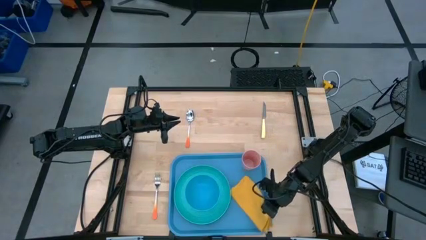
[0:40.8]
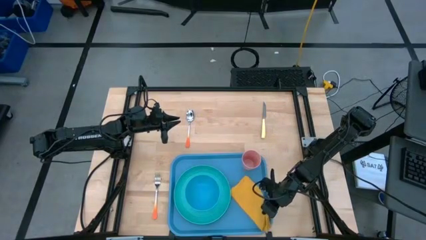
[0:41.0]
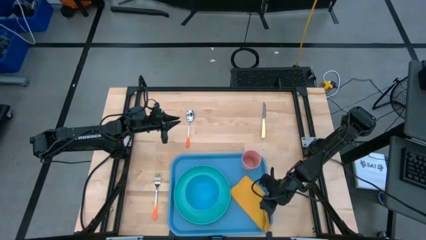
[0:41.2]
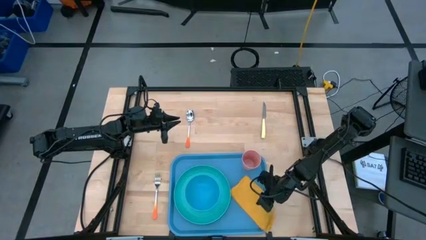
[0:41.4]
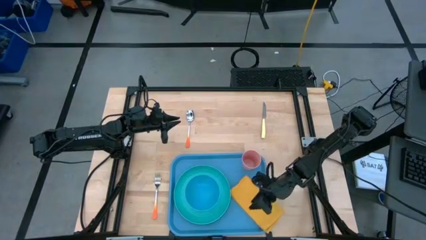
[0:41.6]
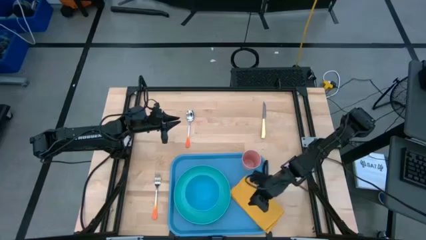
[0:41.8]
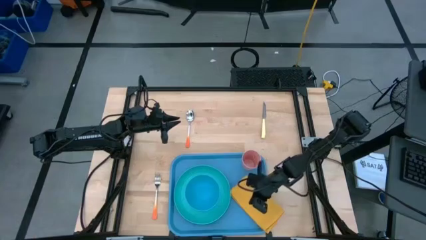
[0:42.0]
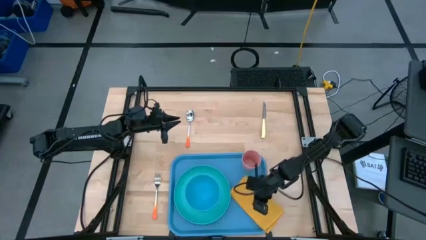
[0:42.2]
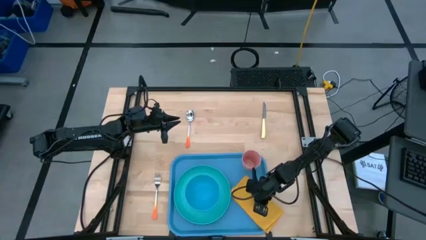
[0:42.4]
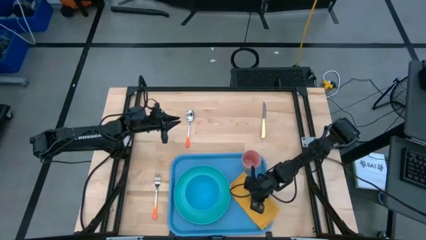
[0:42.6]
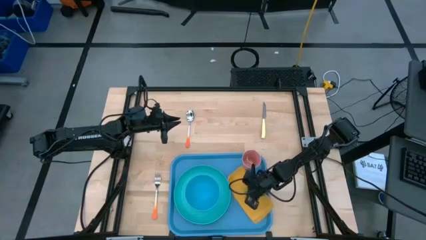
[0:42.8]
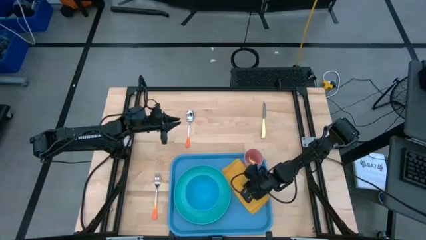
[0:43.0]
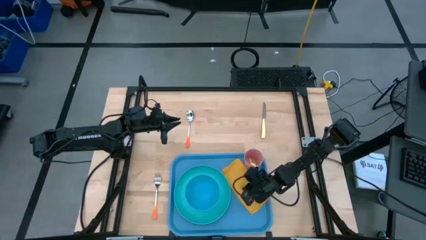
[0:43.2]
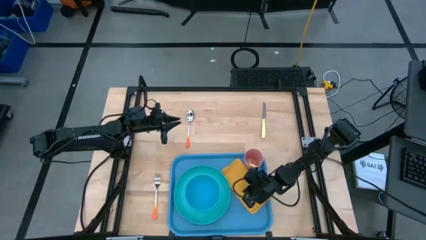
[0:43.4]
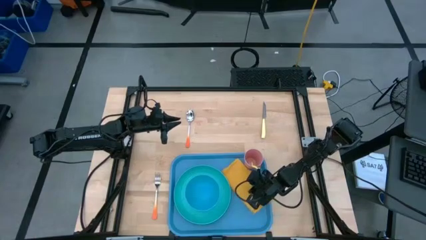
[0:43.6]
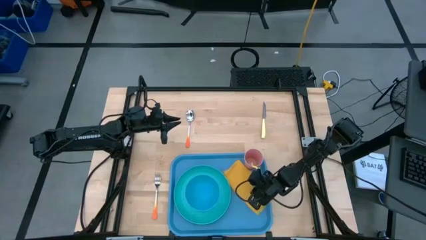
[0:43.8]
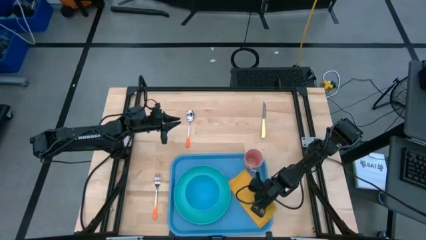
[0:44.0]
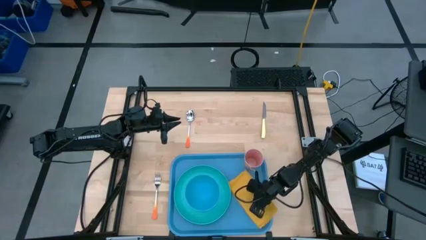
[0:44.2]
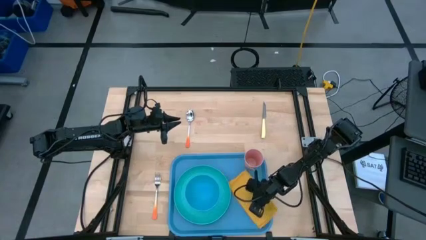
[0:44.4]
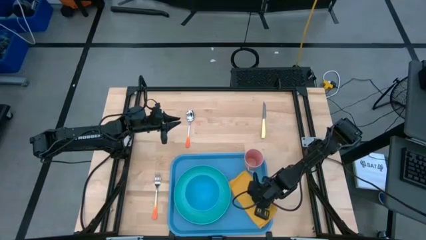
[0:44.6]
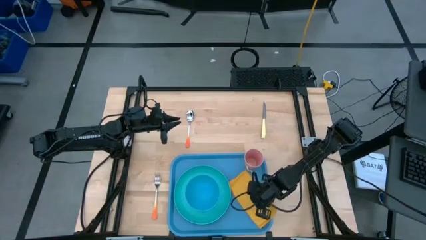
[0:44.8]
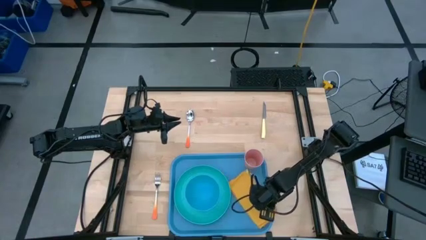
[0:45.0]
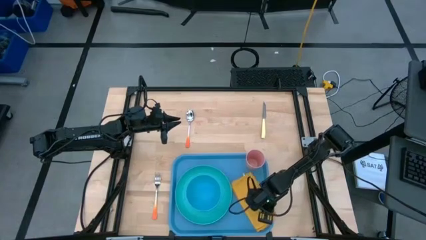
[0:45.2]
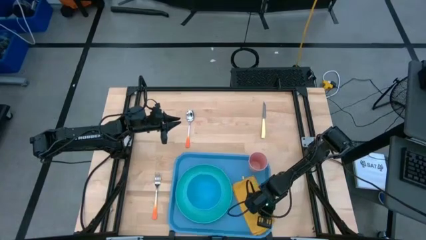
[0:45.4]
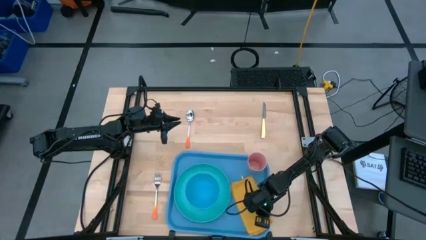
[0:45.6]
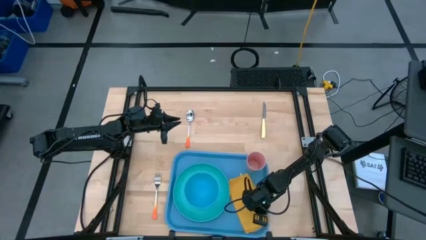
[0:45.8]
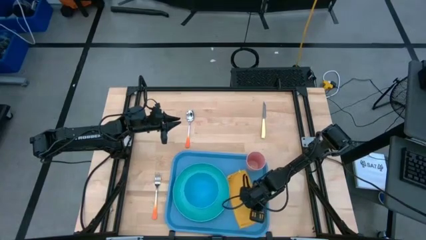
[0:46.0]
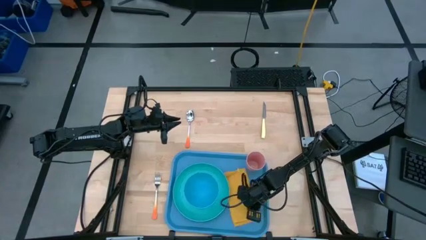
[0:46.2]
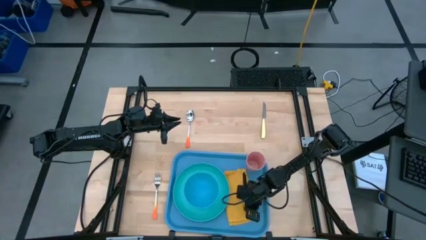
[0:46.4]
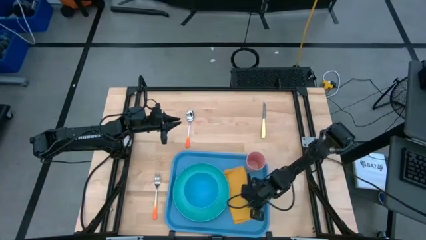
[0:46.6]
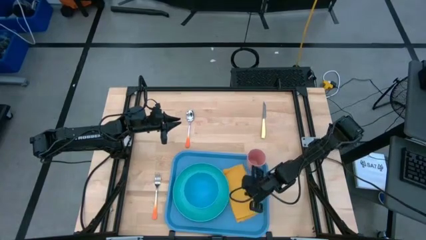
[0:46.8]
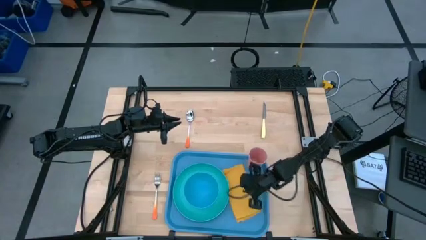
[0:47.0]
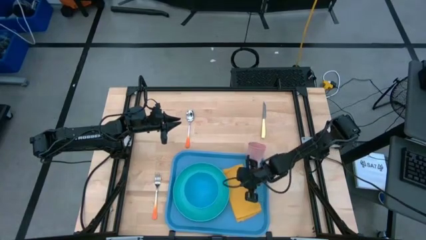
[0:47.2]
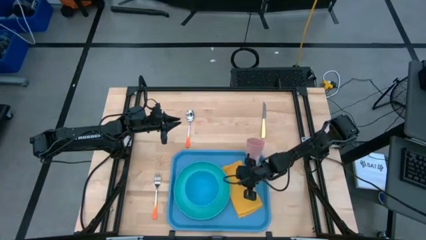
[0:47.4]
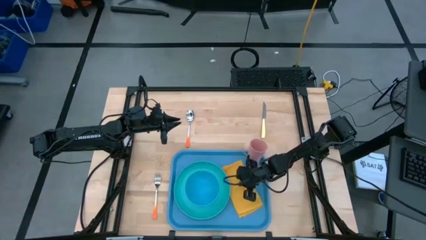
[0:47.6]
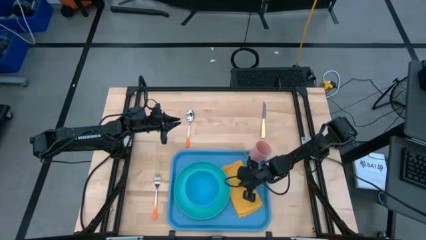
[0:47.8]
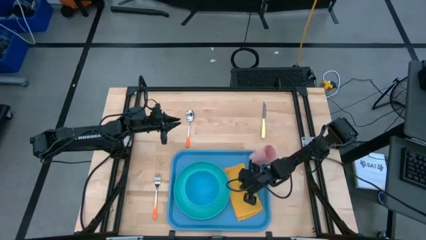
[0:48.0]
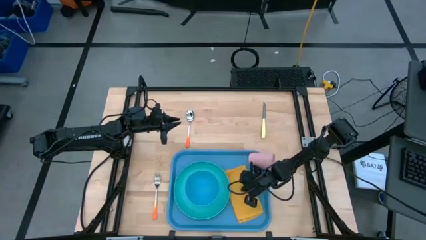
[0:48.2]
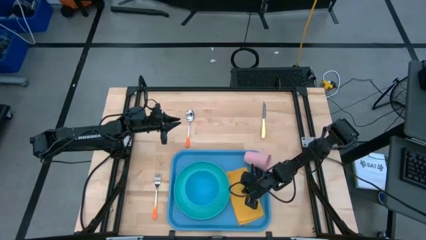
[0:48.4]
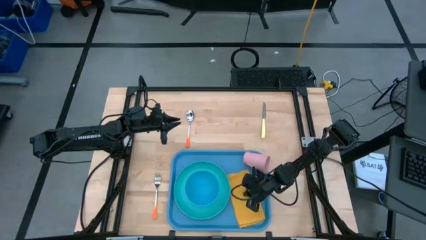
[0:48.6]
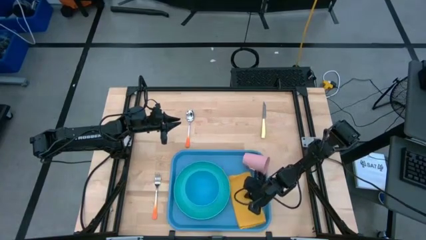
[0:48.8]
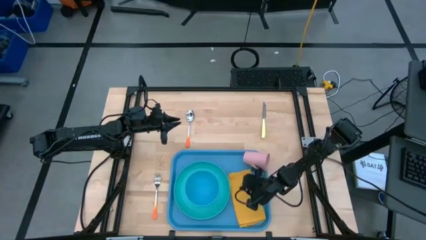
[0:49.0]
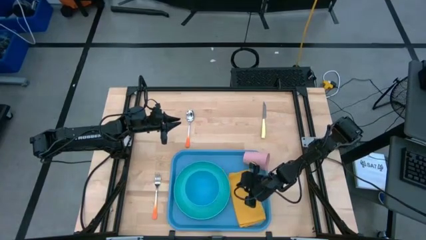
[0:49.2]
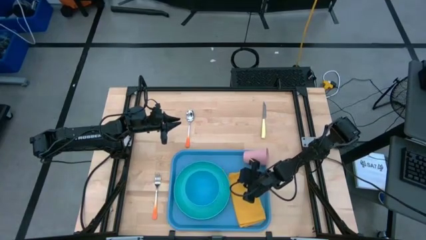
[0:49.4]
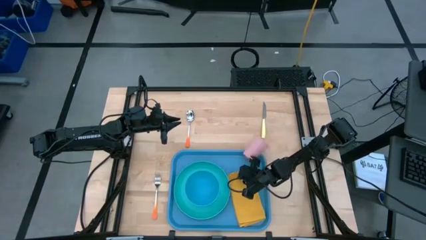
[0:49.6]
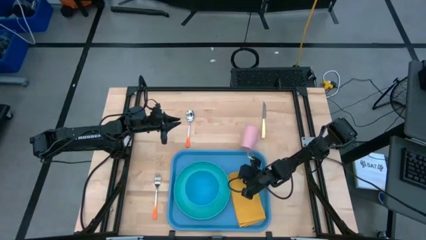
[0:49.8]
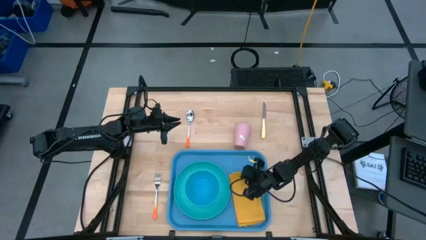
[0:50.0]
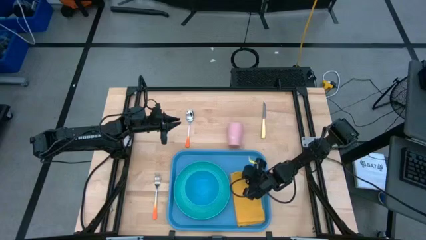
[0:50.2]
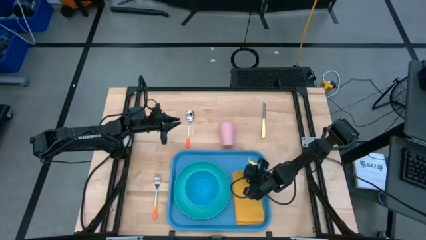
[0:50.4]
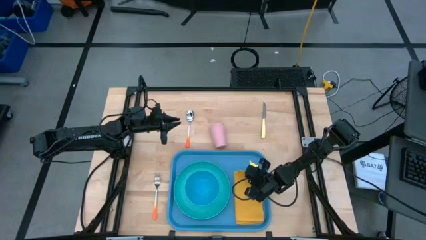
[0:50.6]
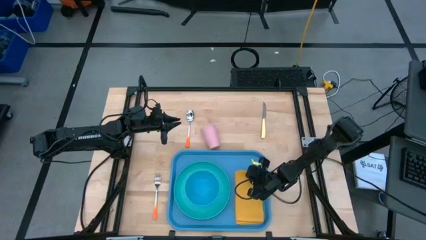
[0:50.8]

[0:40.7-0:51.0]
Task: Set up tray
Put the yellow napkin on the blue serving tray to the right of the light green plate

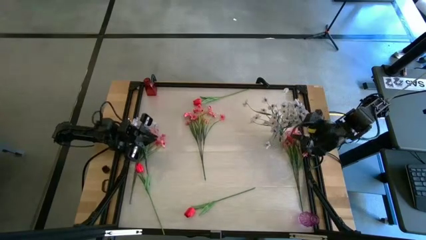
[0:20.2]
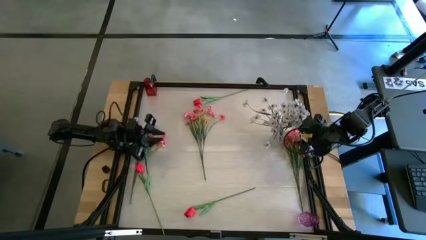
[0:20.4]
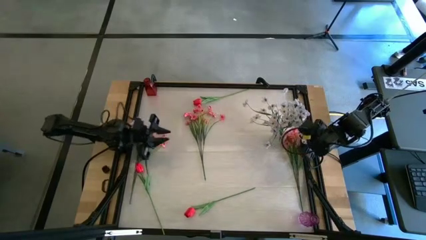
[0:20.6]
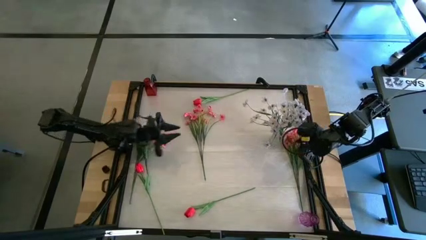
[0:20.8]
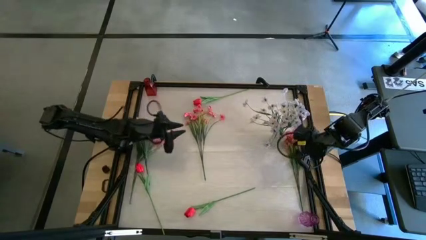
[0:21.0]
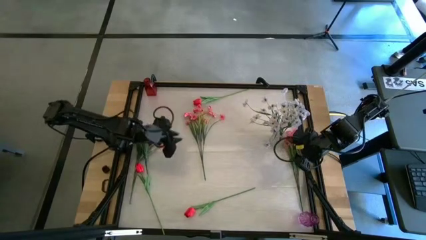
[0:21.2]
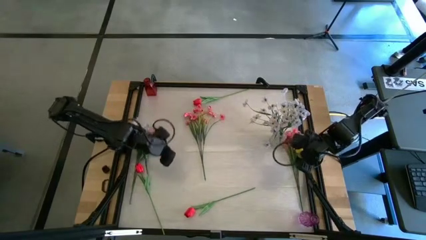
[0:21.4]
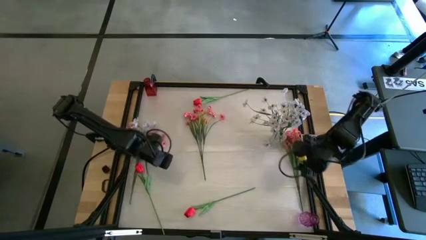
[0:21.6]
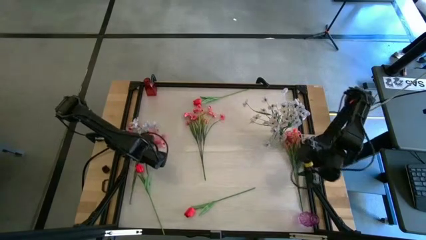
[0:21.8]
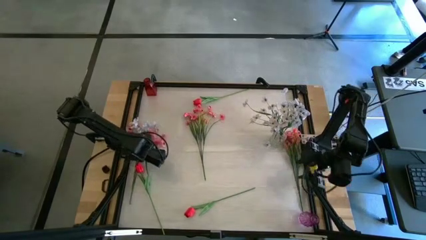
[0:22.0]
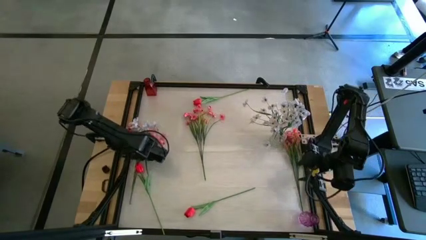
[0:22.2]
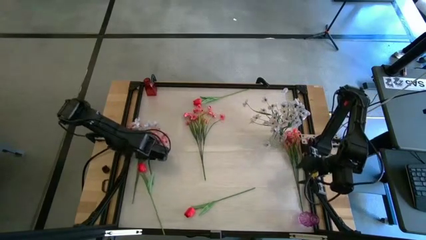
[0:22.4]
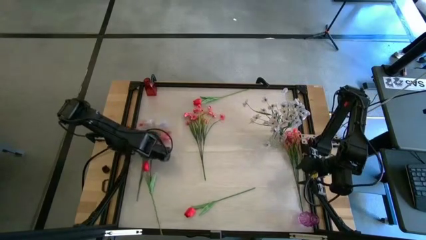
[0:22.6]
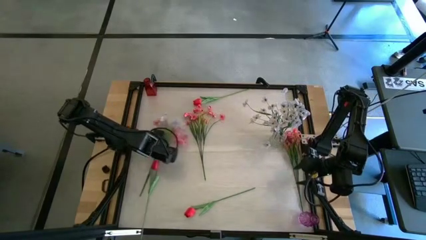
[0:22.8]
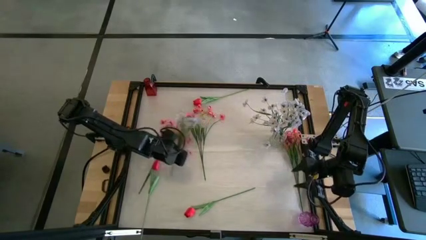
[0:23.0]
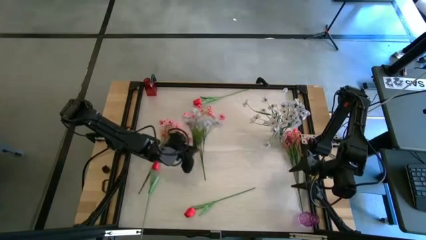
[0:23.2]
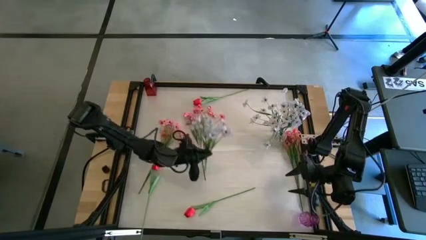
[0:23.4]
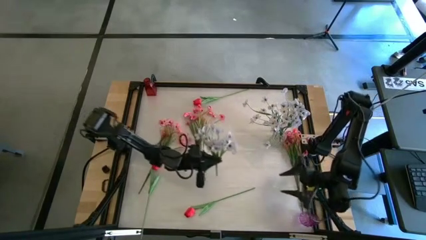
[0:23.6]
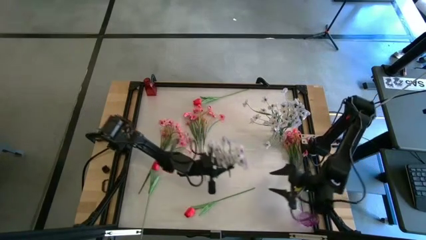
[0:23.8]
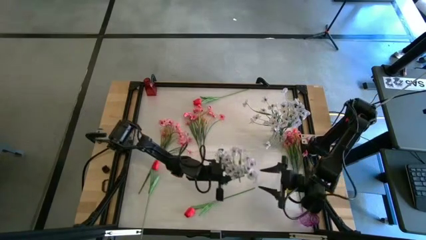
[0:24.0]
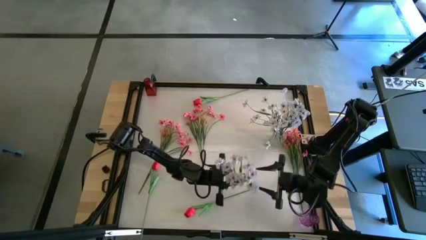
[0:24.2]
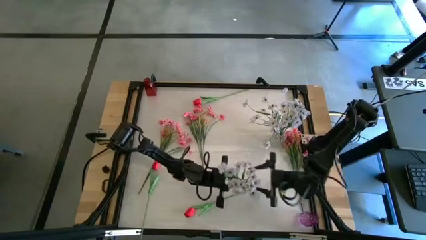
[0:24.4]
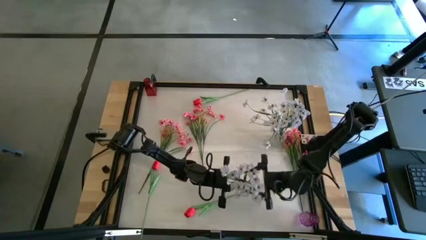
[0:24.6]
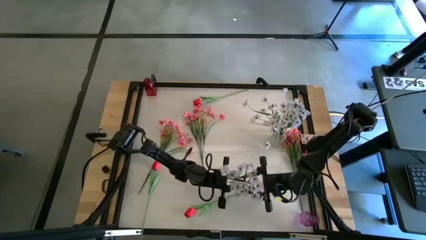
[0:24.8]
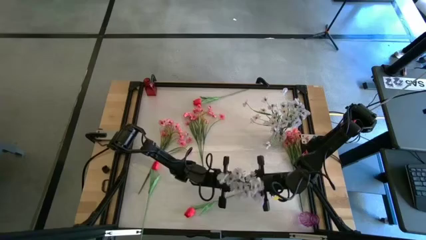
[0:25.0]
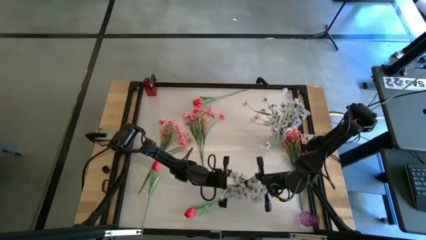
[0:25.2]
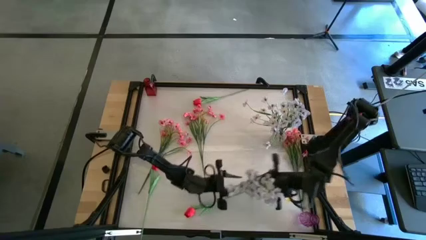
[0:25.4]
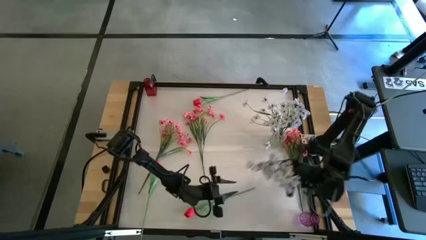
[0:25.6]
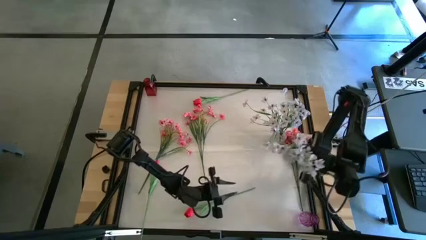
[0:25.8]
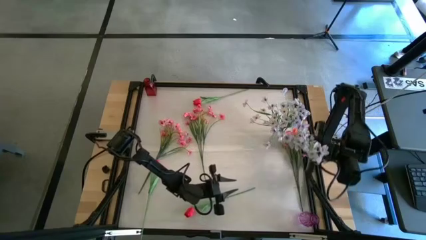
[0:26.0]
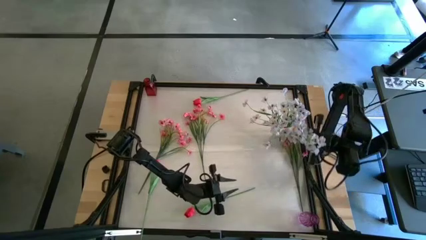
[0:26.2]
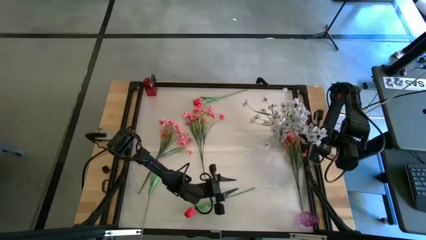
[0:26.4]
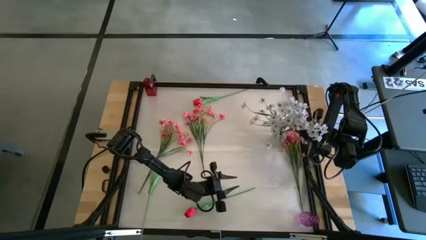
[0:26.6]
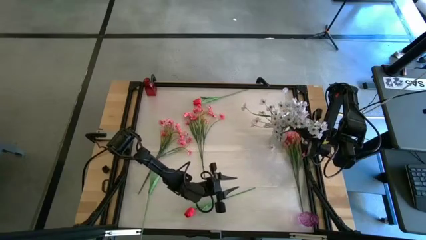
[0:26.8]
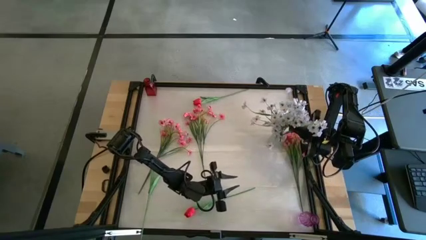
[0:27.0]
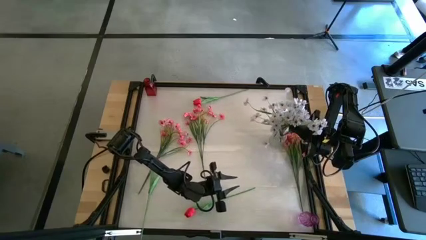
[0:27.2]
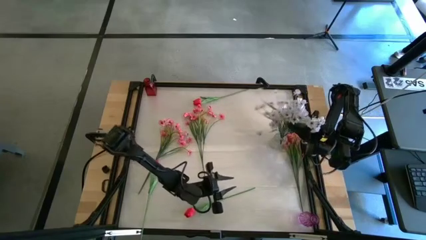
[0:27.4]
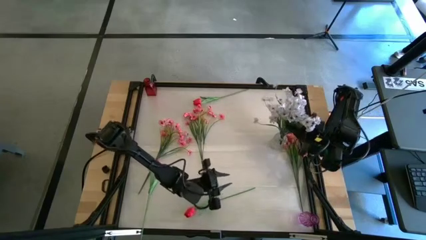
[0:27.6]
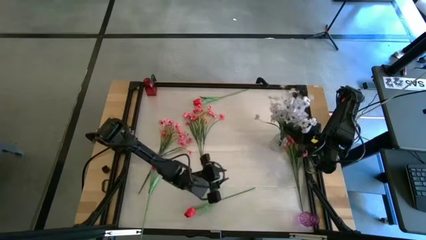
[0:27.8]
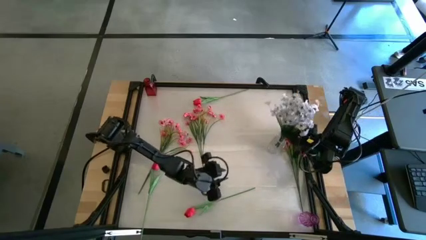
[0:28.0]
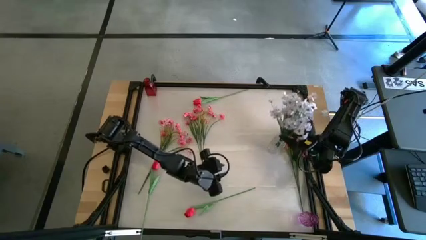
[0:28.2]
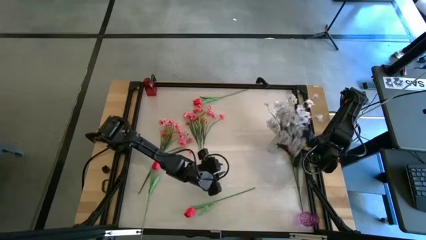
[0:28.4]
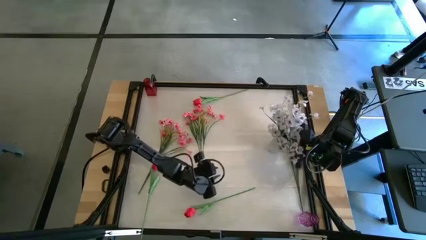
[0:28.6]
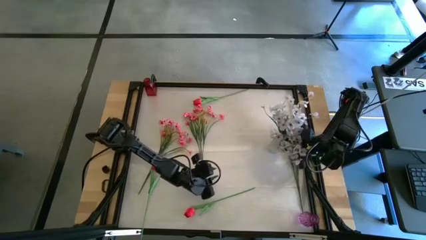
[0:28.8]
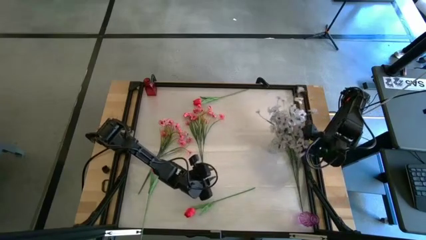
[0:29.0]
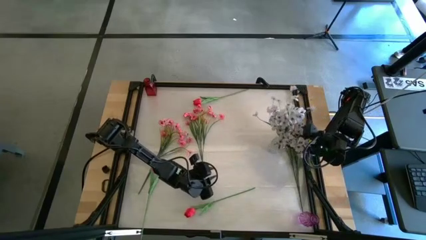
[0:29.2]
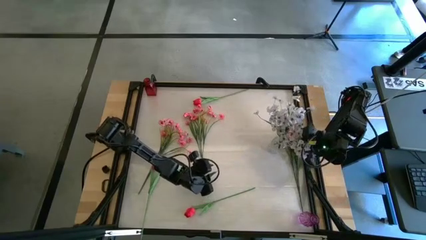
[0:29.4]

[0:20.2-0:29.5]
Task: Sort flowers into vase by color
Put the white flowers into the transparent vase
